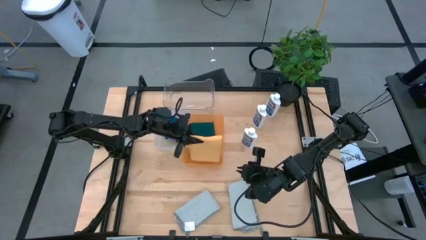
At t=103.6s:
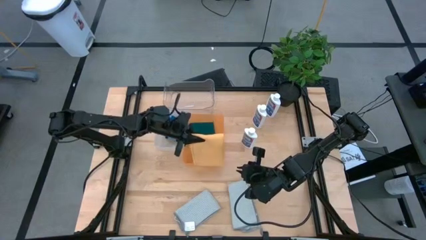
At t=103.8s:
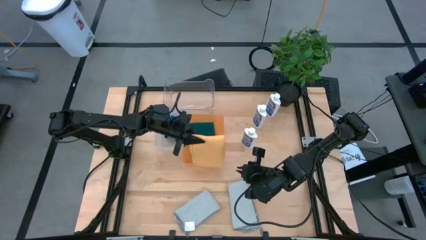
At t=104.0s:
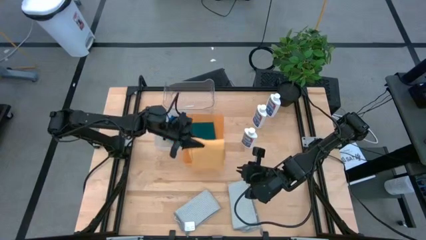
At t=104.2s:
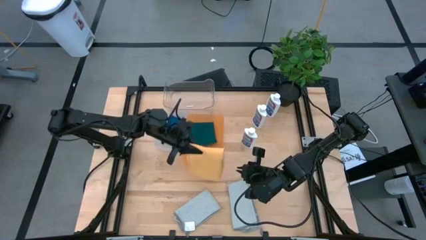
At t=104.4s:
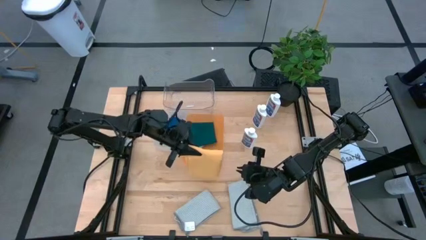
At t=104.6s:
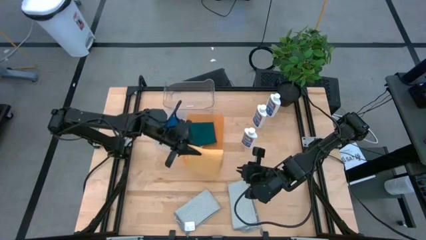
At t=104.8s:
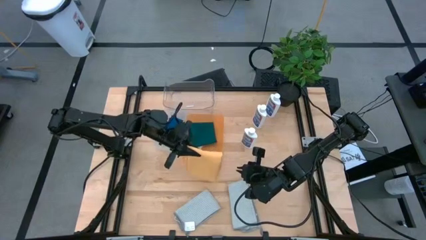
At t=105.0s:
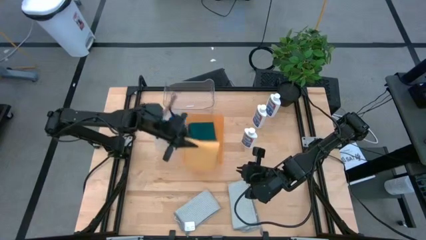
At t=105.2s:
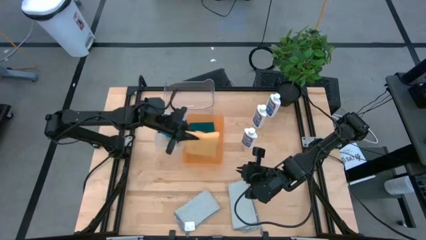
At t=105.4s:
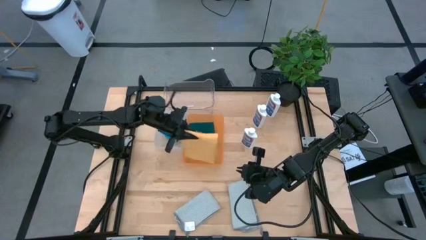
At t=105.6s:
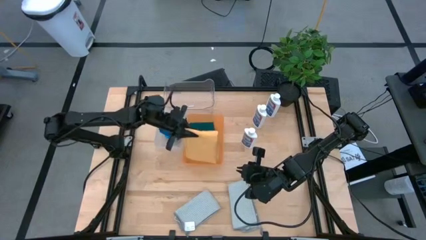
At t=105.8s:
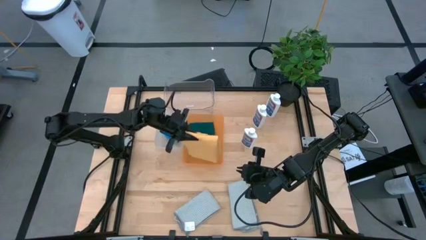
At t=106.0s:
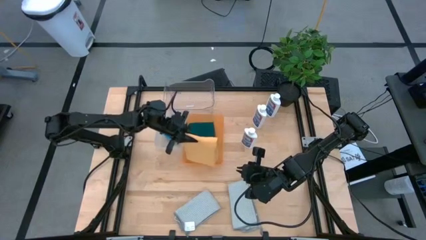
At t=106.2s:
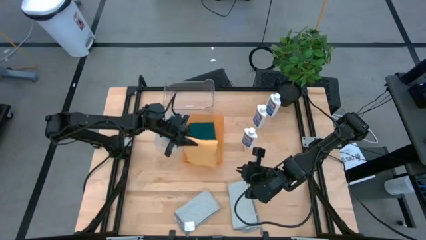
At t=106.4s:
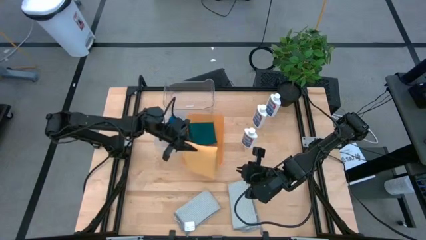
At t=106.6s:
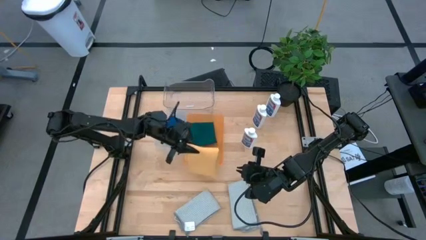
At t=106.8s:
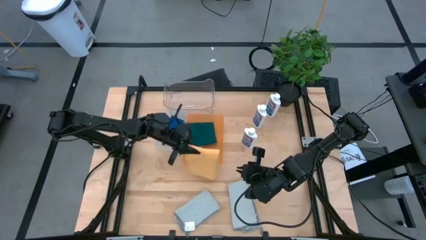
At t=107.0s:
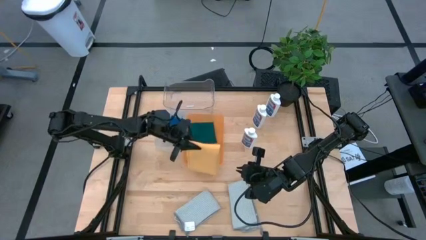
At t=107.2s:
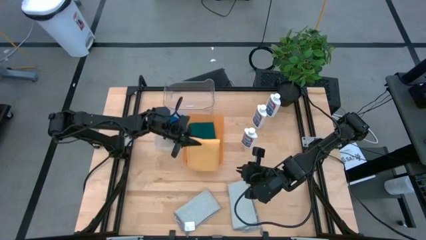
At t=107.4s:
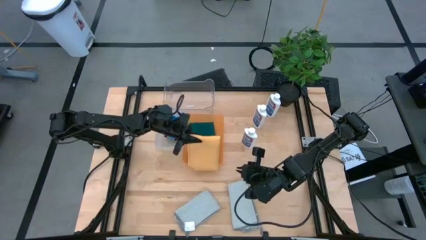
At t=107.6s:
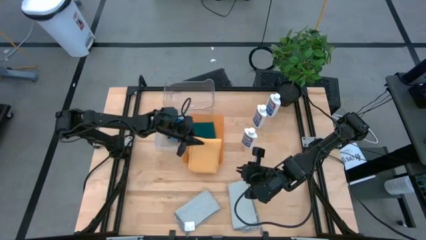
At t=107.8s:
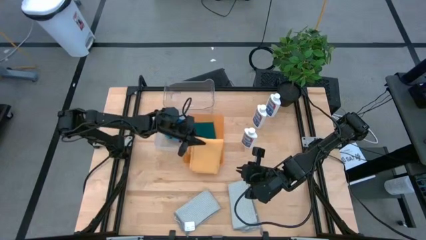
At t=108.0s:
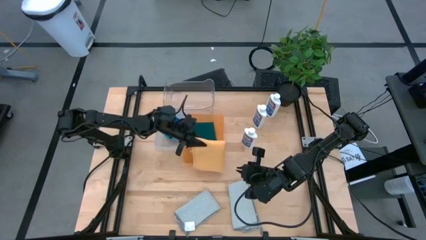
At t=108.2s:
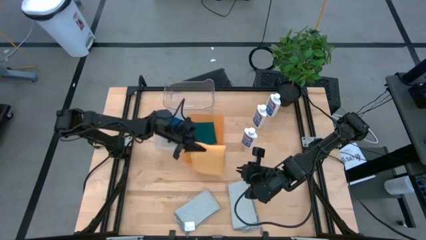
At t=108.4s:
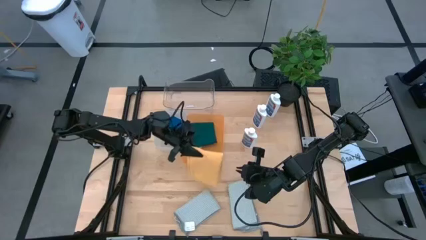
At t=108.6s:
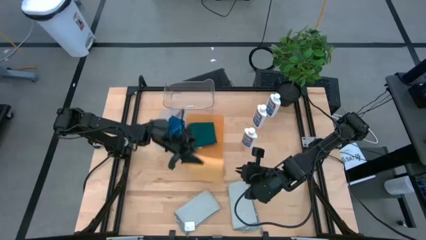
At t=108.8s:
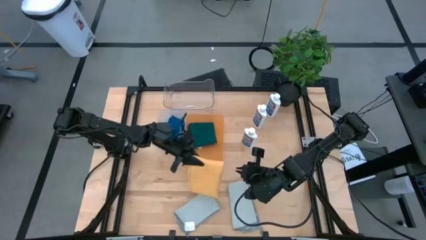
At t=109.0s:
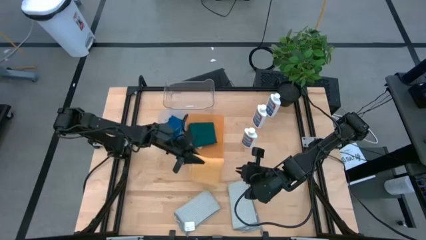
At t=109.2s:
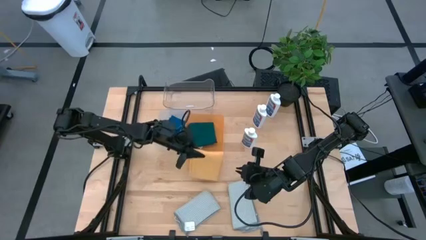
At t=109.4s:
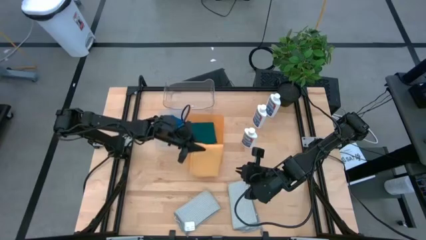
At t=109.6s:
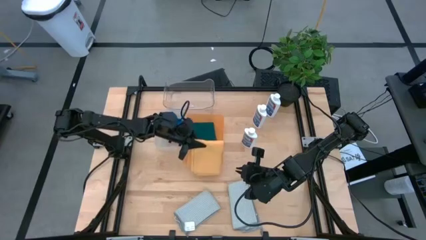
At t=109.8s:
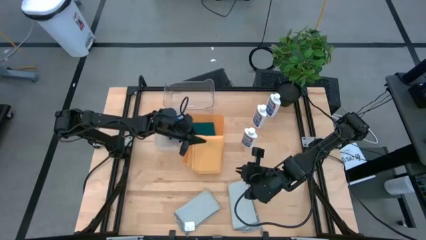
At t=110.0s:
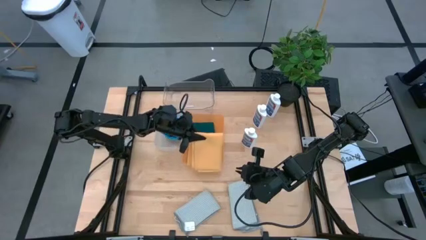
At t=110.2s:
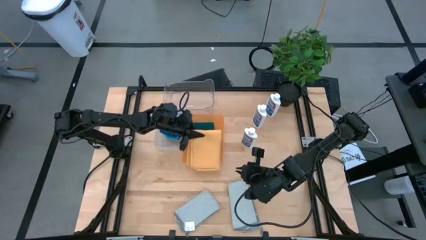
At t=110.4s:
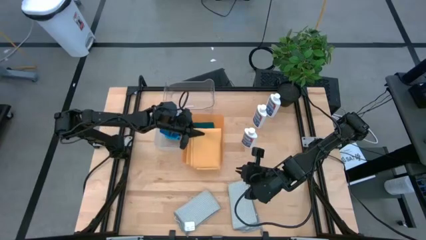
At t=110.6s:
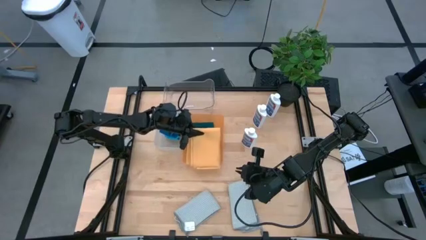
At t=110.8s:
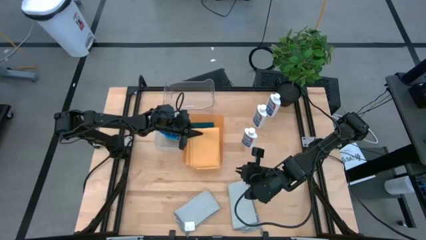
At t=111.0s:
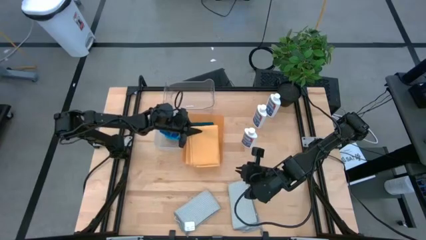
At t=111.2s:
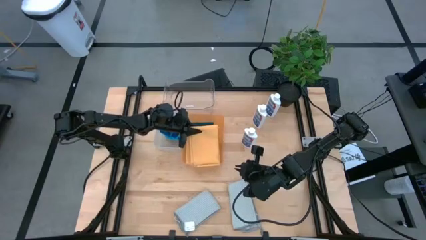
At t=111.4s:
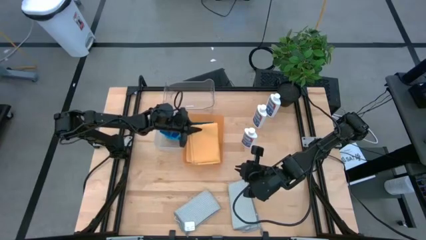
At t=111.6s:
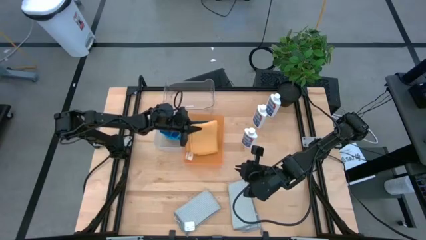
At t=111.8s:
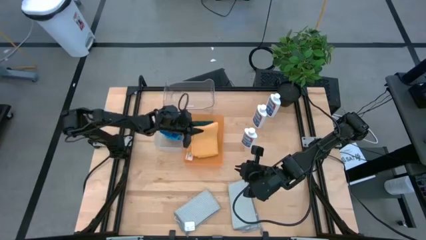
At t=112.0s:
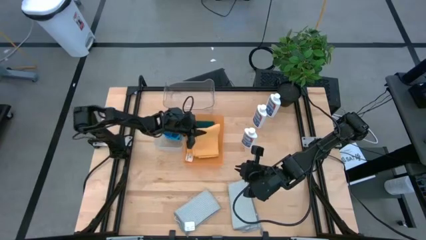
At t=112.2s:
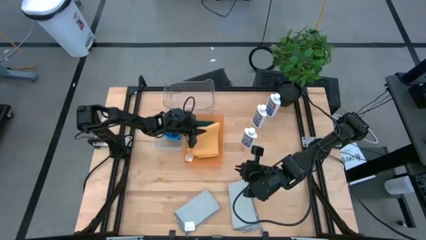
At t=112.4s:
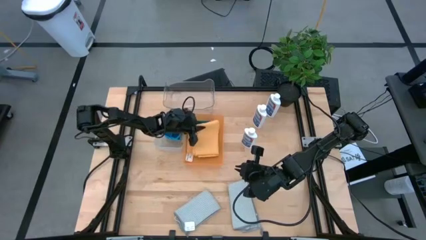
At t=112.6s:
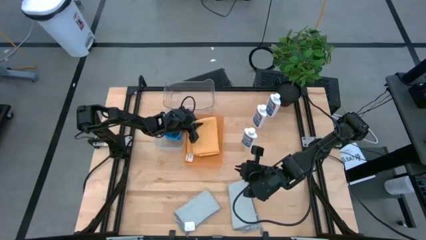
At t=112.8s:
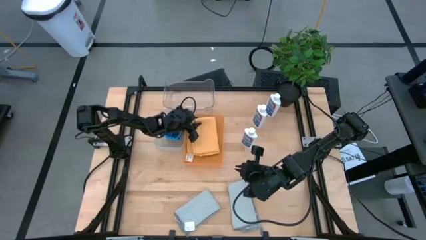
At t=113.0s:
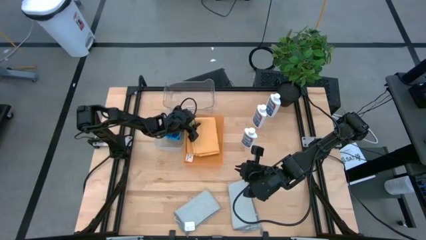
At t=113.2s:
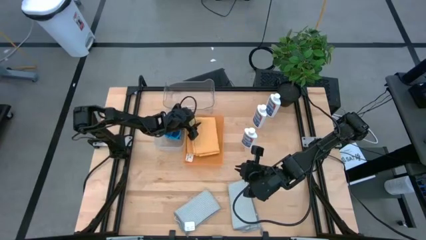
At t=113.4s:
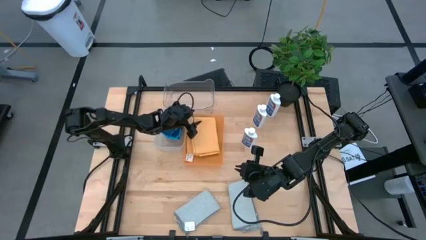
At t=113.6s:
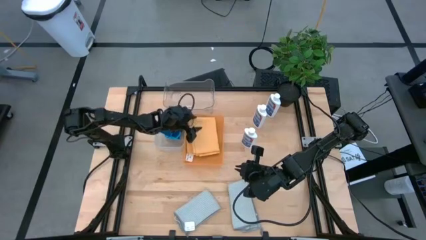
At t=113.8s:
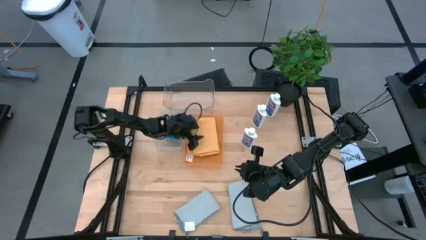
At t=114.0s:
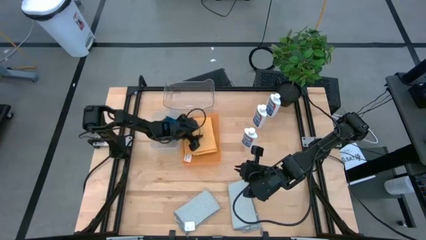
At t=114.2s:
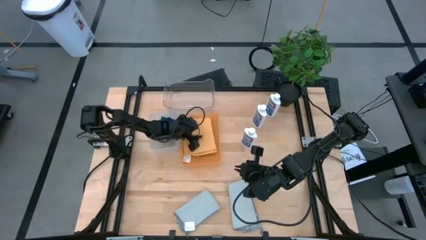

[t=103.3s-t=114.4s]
Task: Pick & Place Kitchen Items
Put the yellow towel into the orange bin

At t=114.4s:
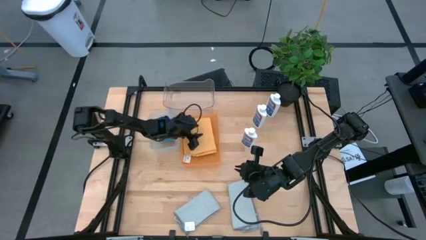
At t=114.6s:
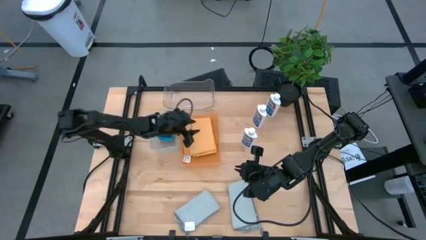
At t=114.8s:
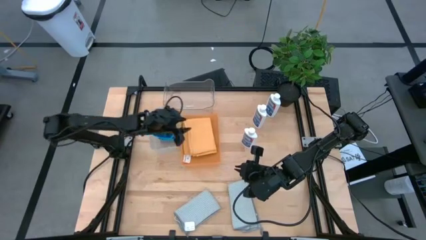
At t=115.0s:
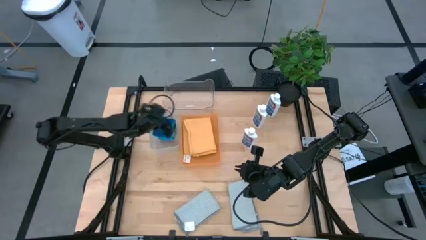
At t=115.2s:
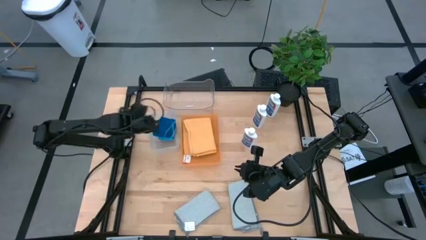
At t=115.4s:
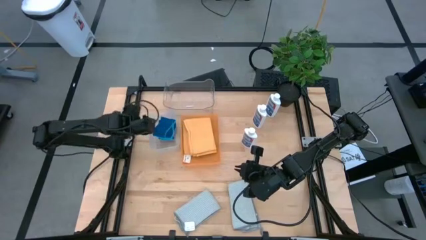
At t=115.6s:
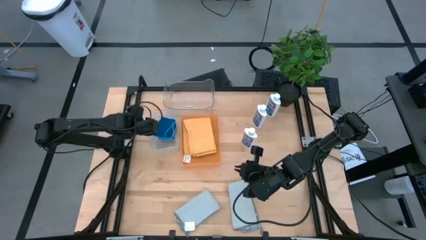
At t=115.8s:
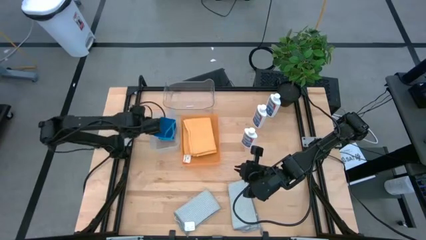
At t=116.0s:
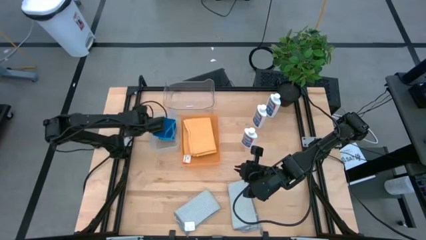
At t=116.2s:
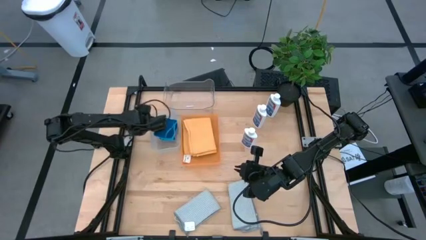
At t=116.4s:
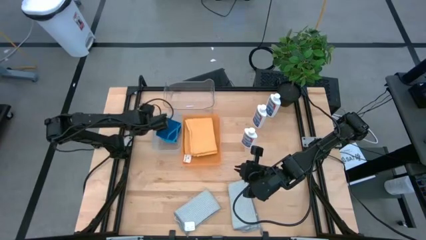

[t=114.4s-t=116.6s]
Adjust the white bin
